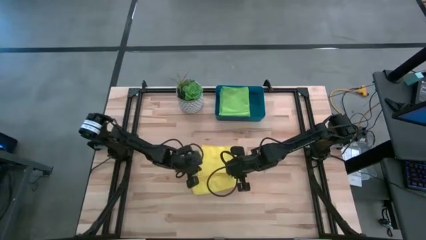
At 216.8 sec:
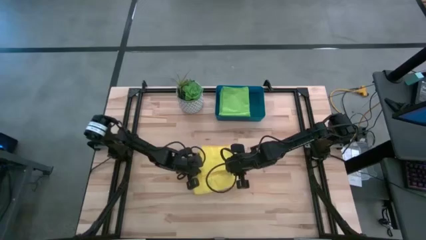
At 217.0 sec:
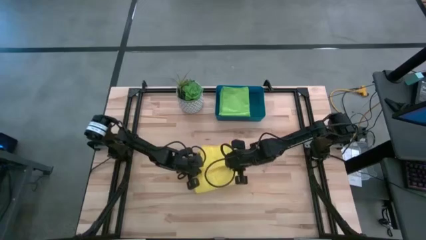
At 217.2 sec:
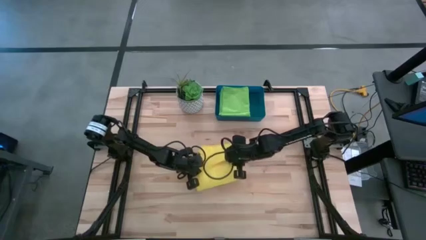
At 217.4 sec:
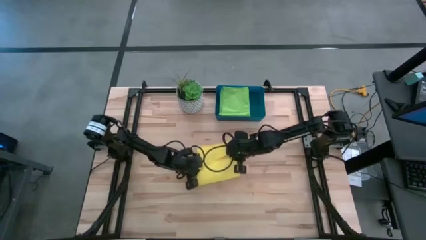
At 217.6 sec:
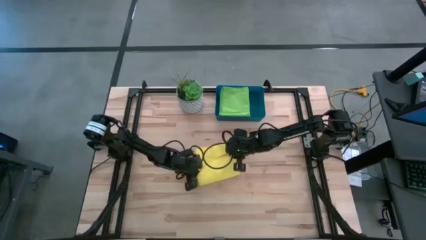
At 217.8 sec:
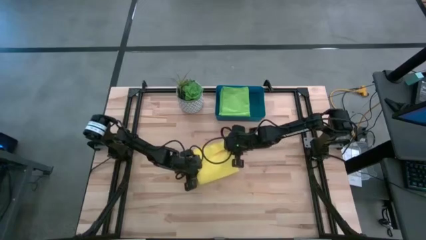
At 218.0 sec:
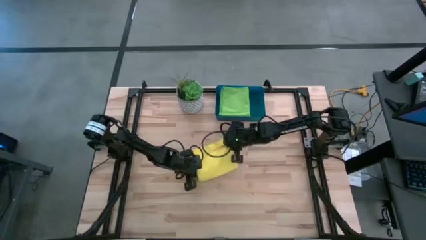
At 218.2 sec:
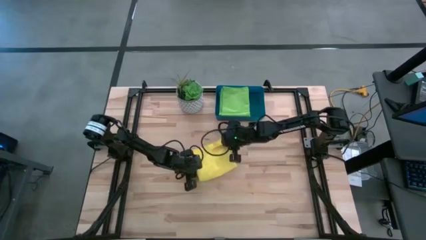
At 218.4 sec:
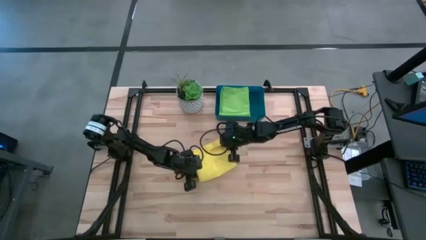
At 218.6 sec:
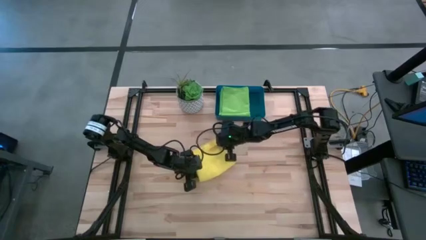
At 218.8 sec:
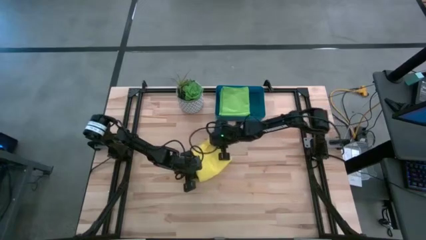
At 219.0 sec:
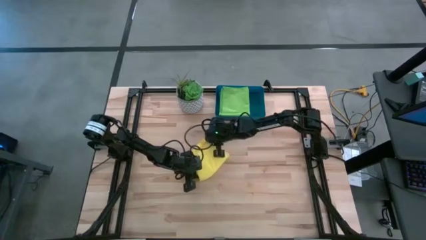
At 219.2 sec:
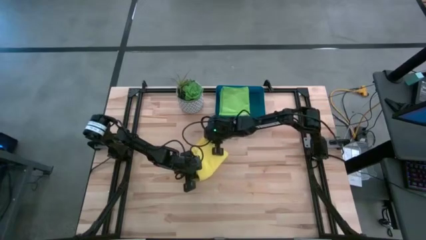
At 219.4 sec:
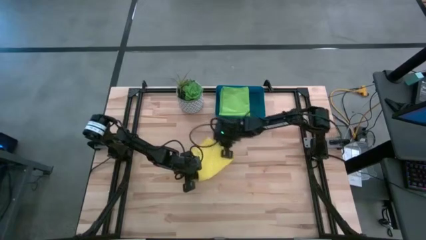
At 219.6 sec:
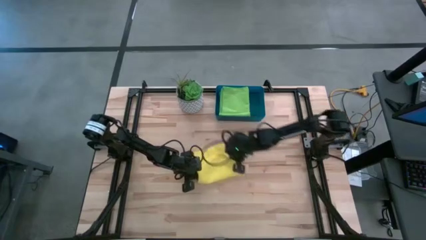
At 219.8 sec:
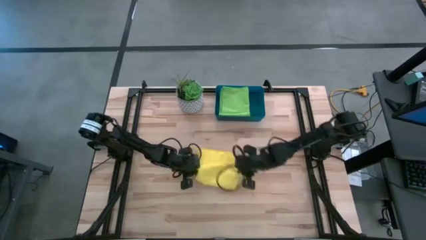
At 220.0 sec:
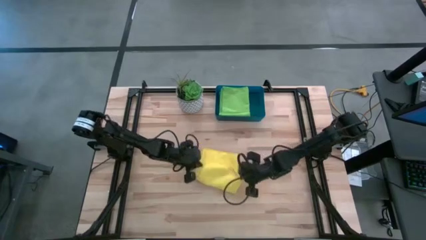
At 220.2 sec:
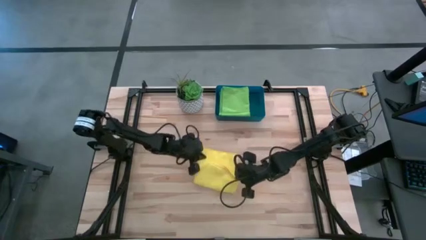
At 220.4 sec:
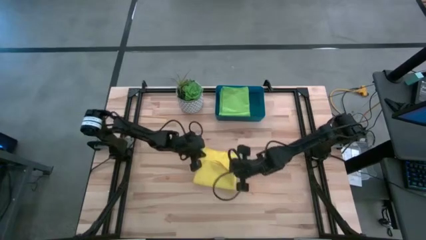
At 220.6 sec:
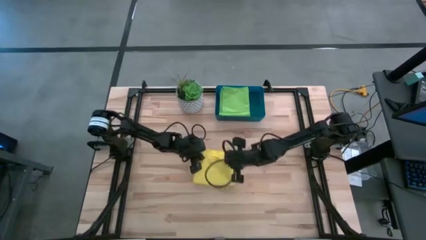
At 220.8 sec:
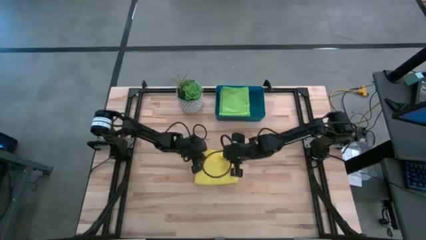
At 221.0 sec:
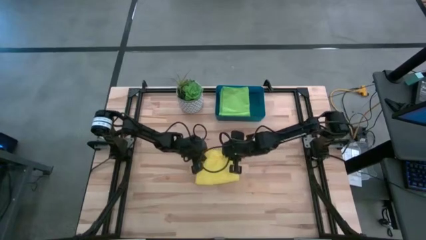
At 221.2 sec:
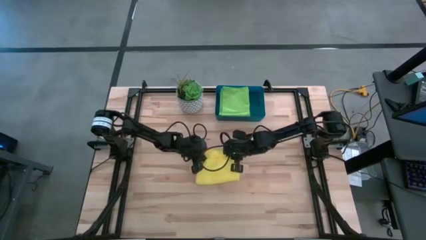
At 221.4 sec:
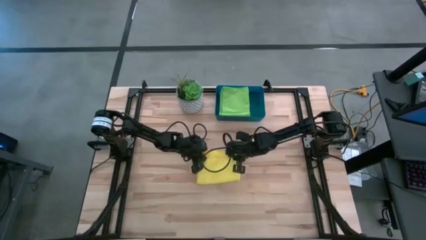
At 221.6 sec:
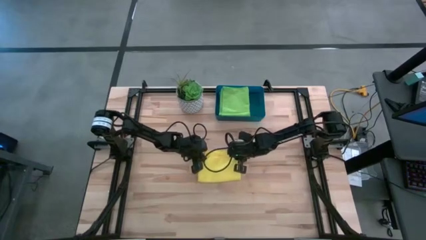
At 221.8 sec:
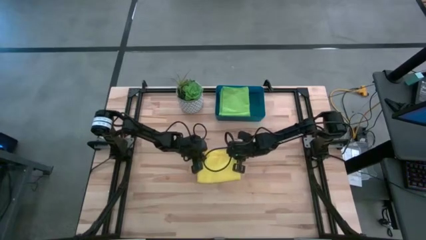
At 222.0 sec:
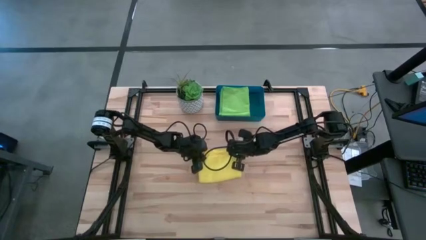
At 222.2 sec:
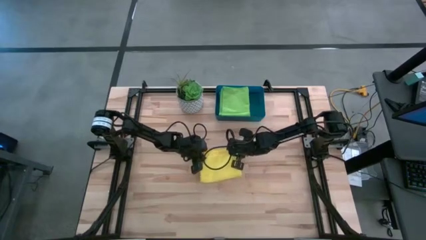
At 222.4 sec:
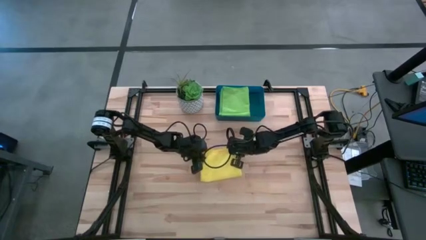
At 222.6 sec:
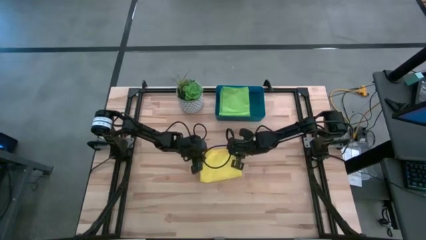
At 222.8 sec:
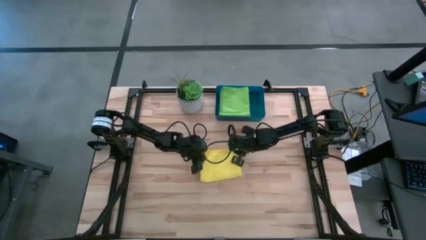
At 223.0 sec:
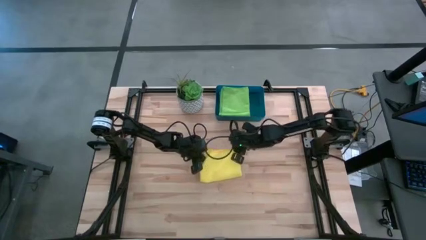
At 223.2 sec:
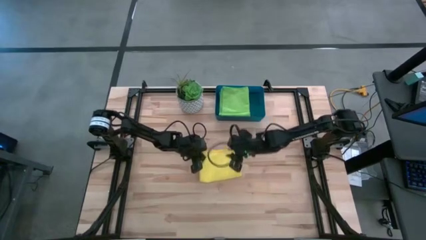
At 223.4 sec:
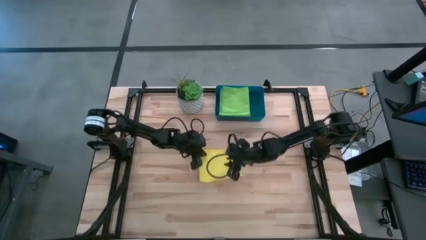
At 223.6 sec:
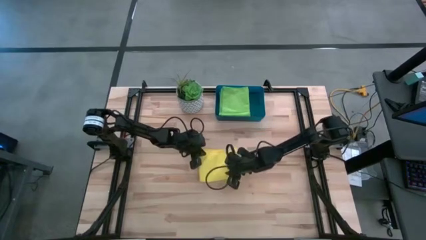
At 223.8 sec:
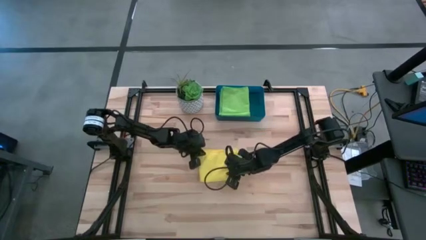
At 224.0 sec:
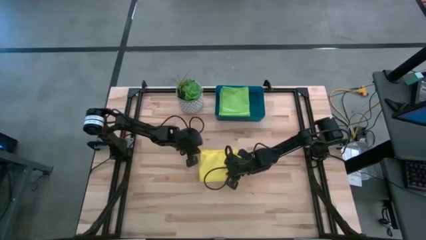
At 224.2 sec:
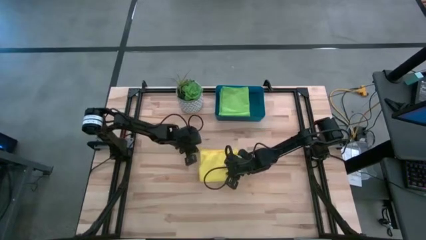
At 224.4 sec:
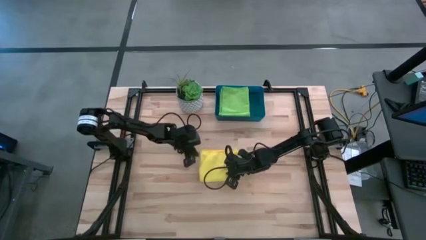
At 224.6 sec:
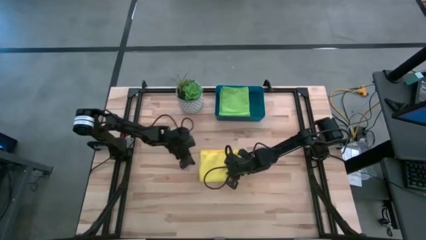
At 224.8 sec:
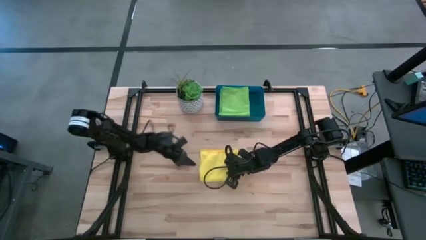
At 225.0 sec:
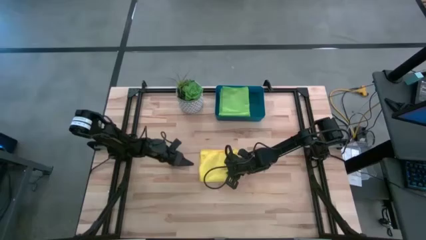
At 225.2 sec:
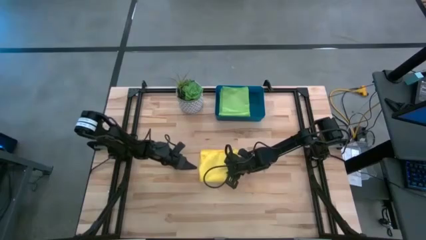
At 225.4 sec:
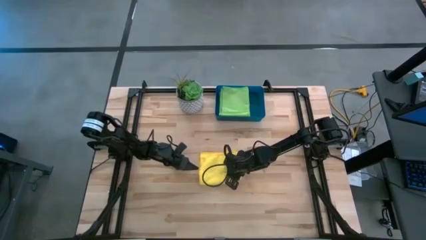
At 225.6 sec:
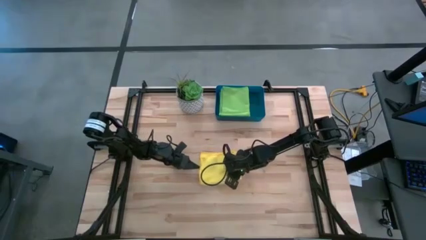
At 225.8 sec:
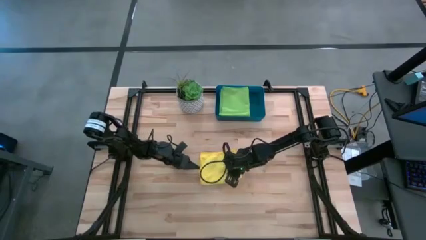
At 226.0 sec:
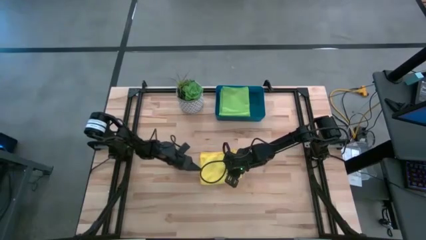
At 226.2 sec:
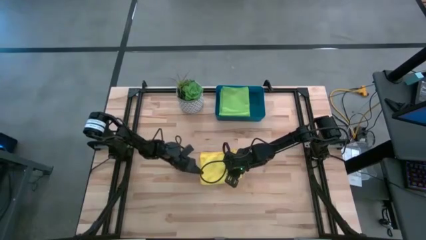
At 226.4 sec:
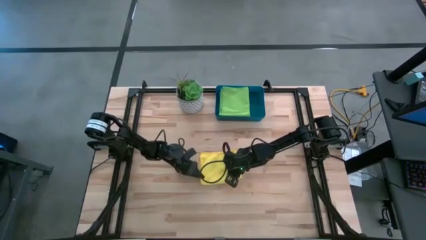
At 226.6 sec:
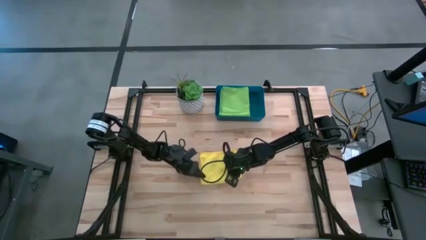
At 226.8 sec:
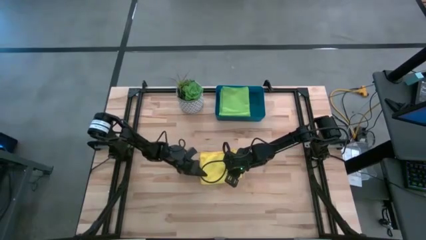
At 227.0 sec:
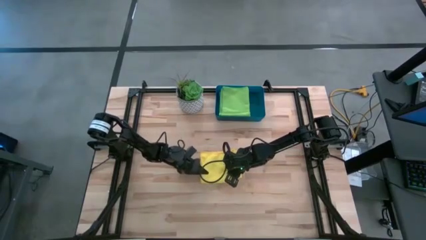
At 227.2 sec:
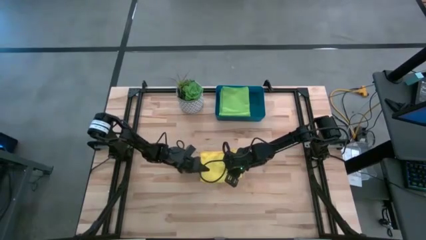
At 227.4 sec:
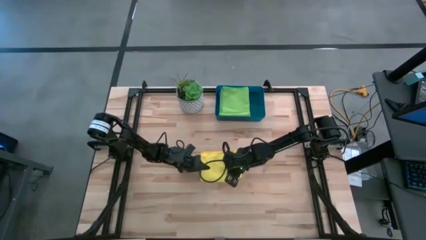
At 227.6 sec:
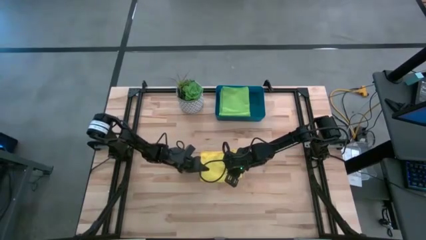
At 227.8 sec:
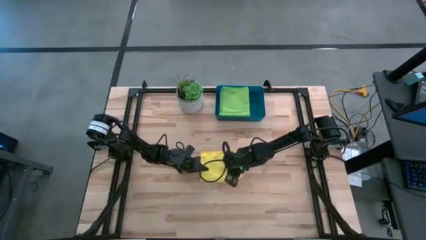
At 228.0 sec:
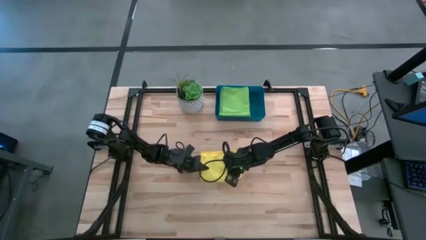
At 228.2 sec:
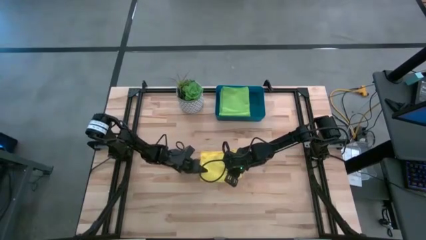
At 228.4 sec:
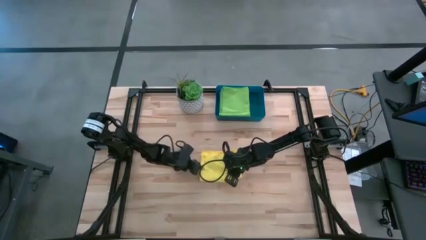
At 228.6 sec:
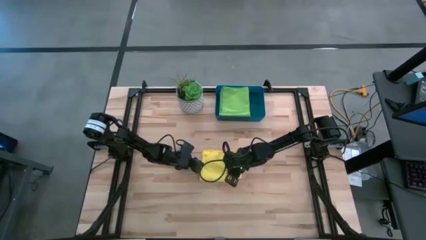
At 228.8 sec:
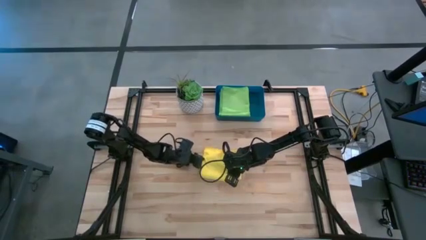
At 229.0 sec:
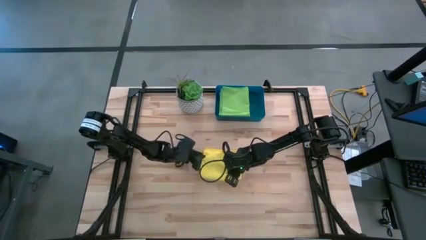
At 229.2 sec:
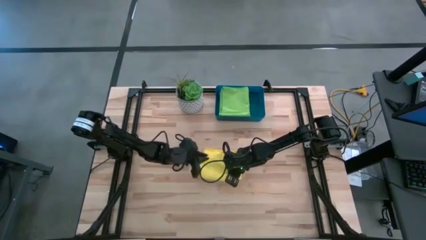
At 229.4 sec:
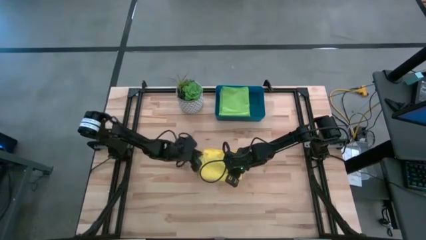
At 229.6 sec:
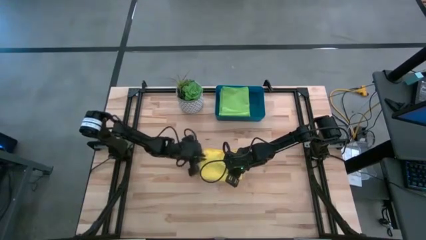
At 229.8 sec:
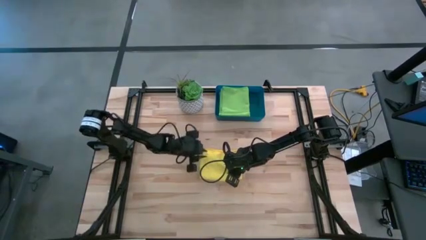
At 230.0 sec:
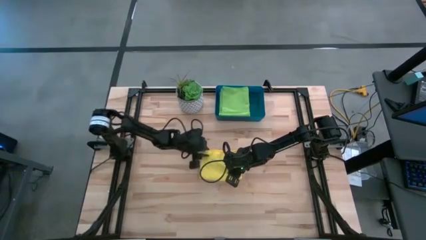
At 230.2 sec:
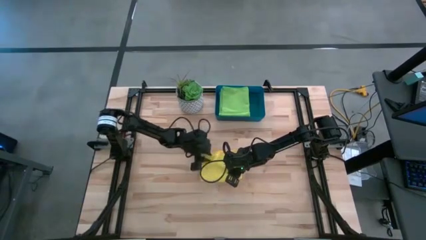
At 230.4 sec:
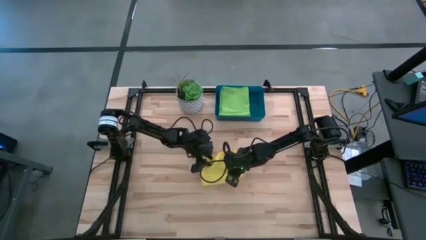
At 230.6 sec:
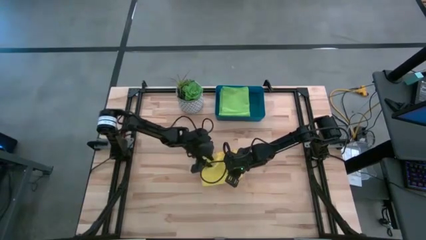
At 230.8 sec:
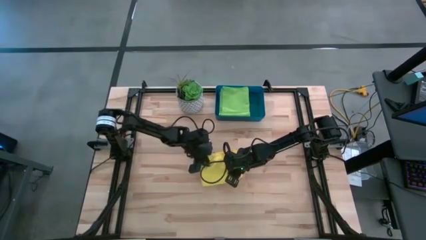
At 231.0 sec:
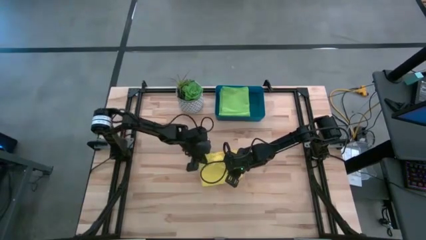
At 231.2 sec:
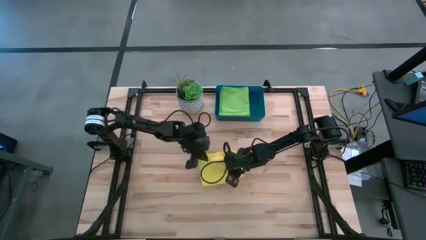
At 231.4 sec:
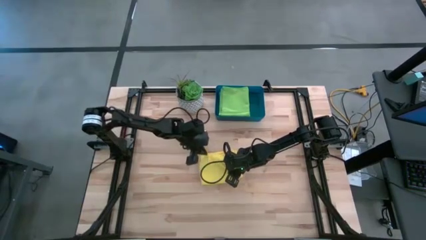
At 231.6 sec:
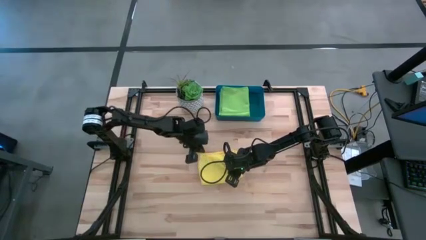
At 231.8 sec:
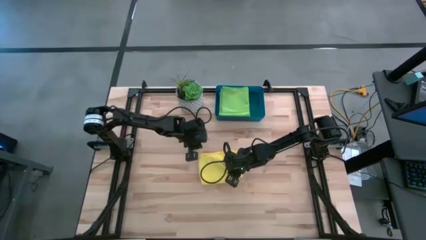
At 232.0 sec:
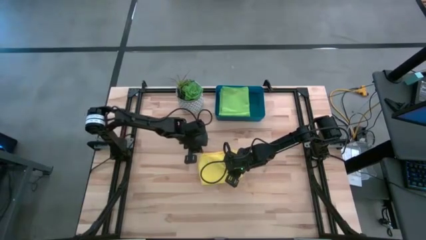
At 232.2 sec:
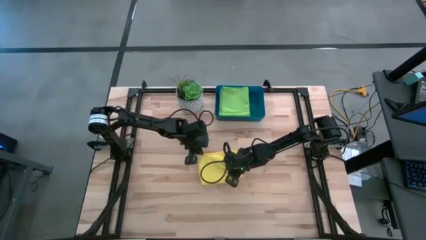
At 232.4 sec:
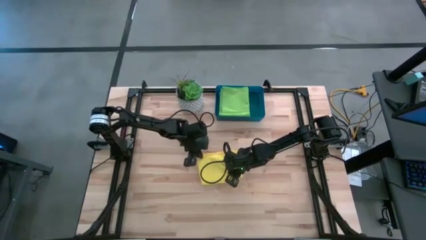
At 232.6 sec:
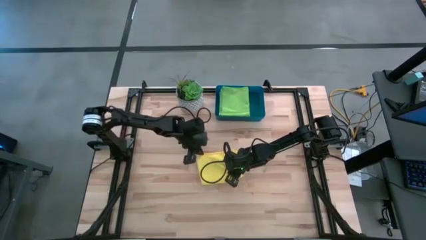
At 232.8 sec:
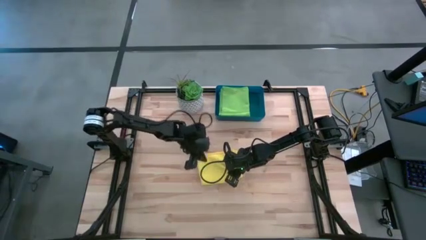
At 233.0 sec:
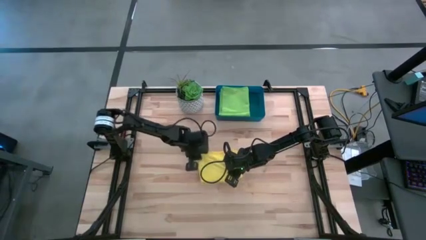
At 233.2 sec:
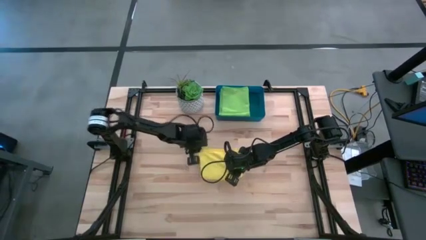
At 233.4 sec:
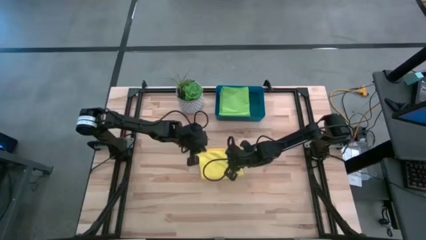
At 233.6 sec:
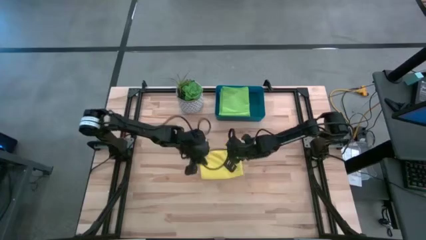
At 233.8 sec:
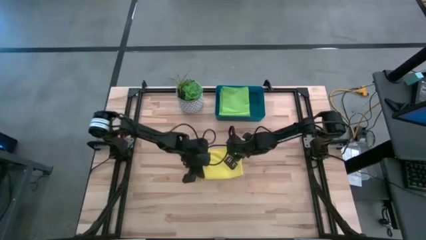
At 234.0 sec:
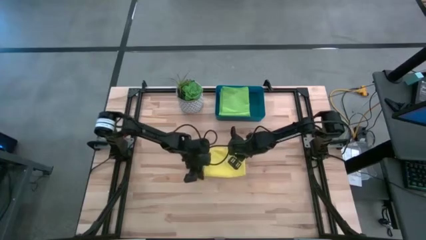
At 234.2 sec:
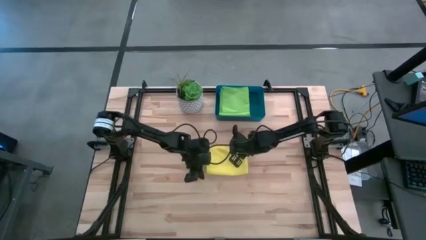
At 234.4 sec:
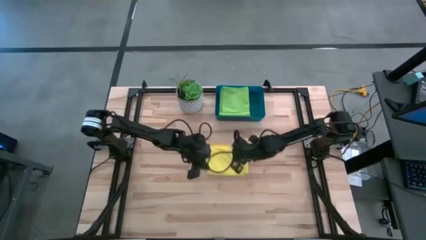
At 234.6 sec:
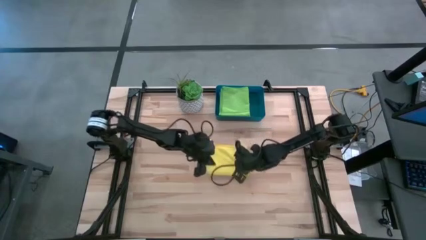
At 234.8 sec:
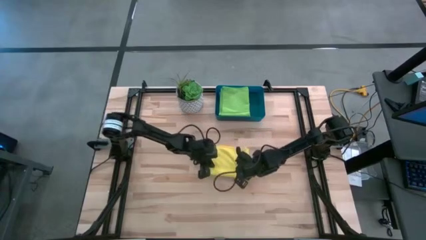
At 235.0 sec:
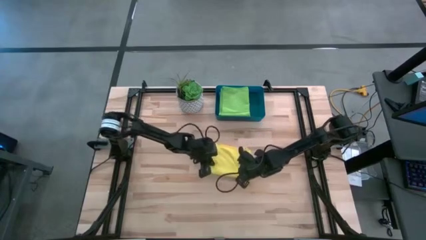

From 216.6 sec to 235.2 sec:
Task: Fold microfiber towels
Fold the yellow microfiber towel on top of the green microfiber towel into the dark blue bin
